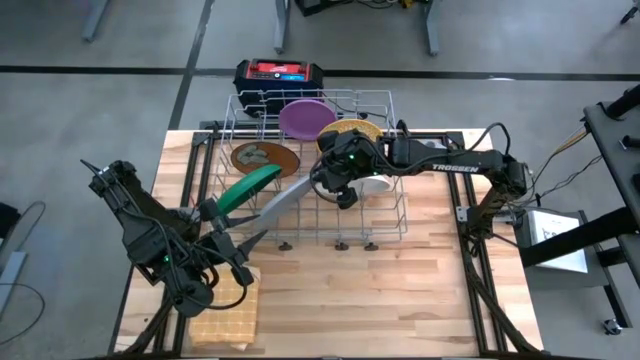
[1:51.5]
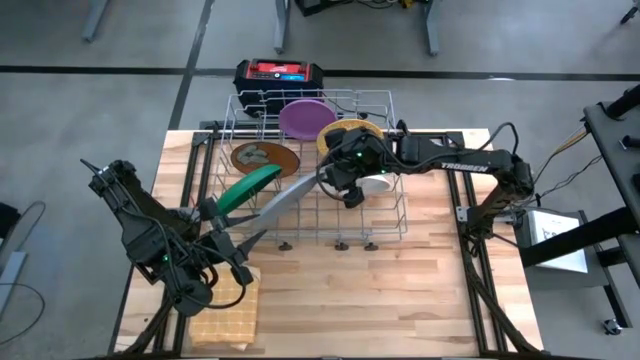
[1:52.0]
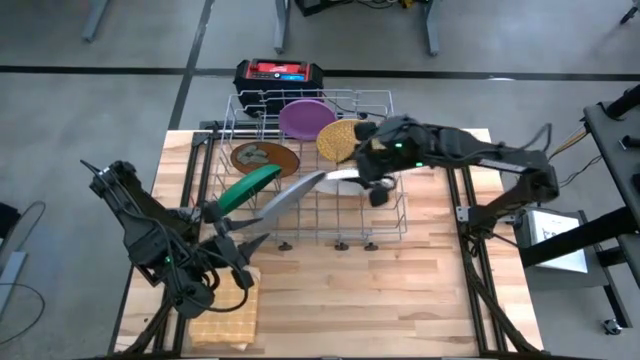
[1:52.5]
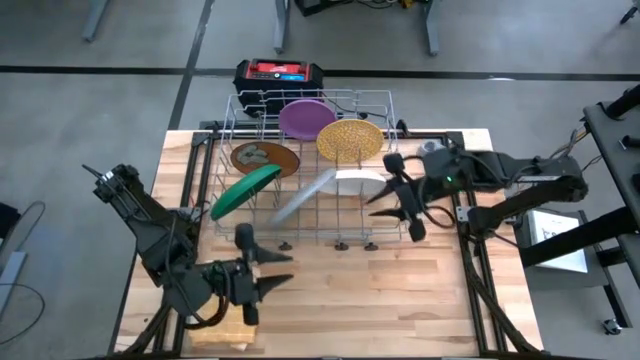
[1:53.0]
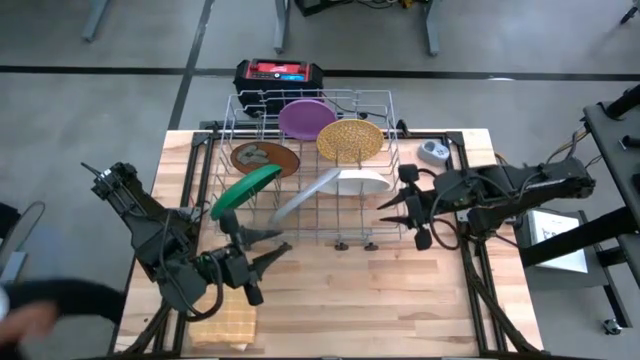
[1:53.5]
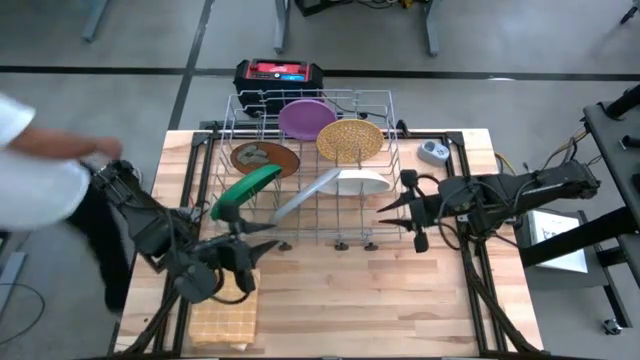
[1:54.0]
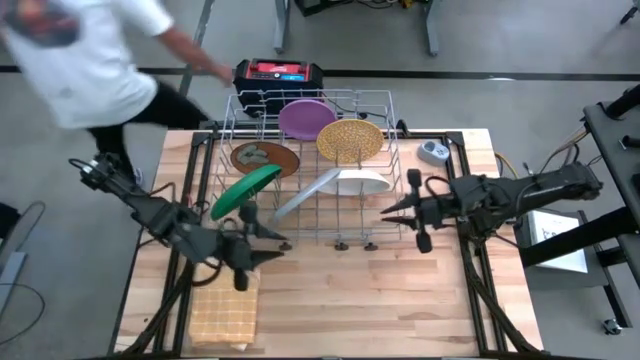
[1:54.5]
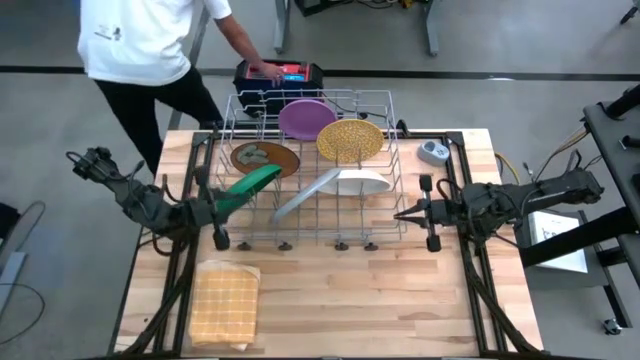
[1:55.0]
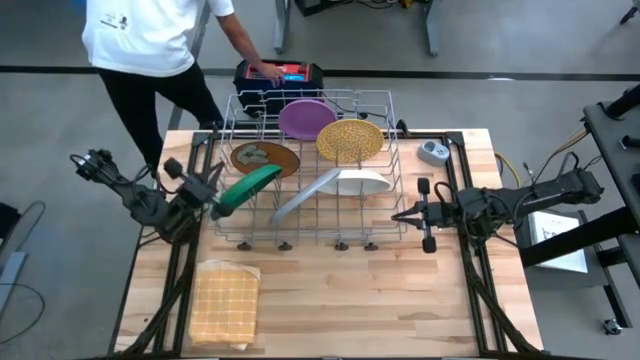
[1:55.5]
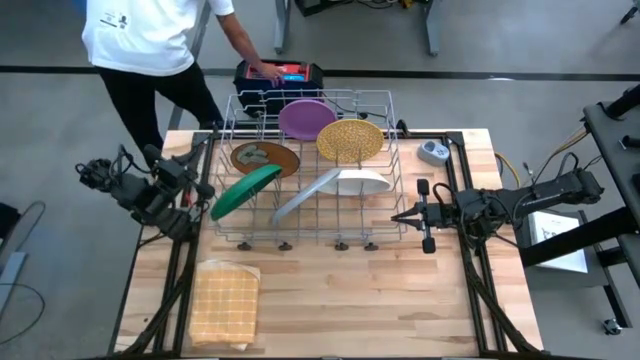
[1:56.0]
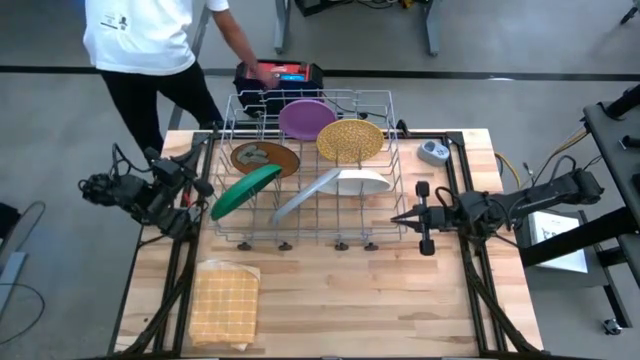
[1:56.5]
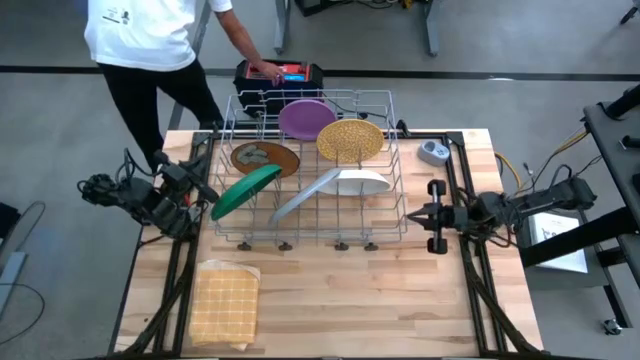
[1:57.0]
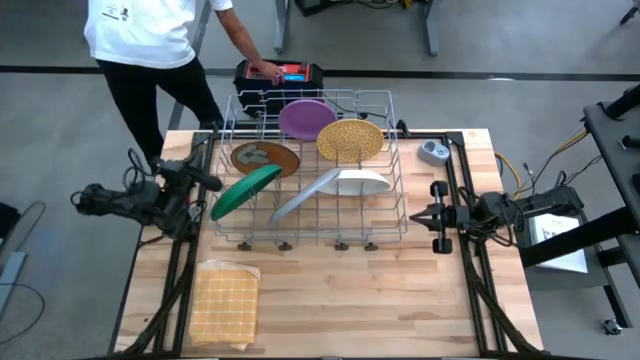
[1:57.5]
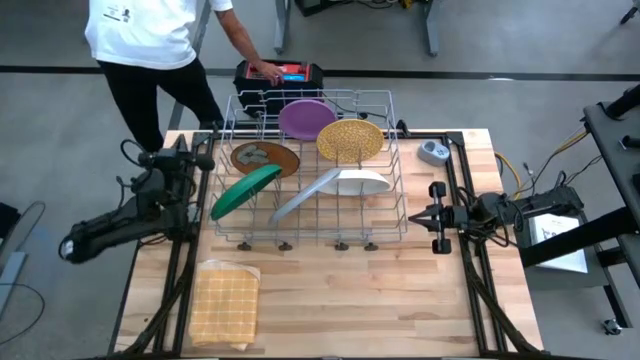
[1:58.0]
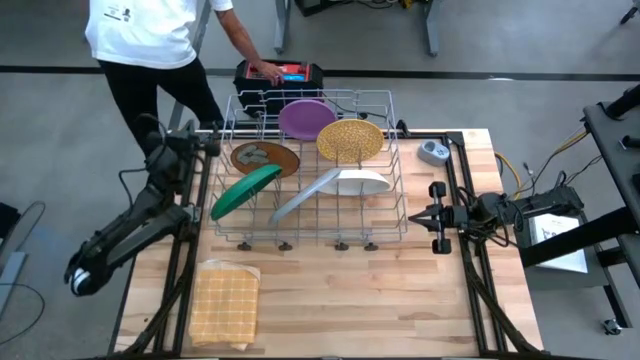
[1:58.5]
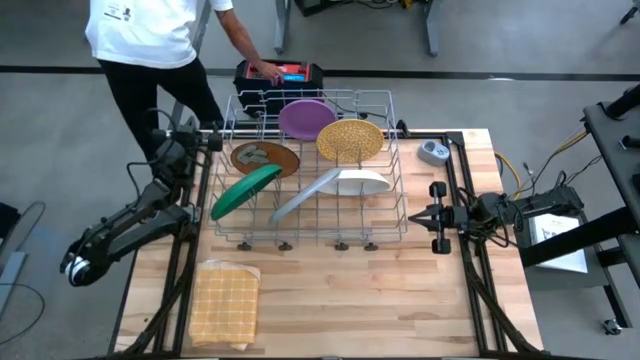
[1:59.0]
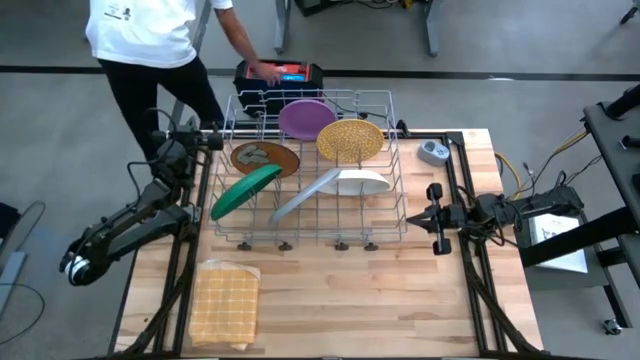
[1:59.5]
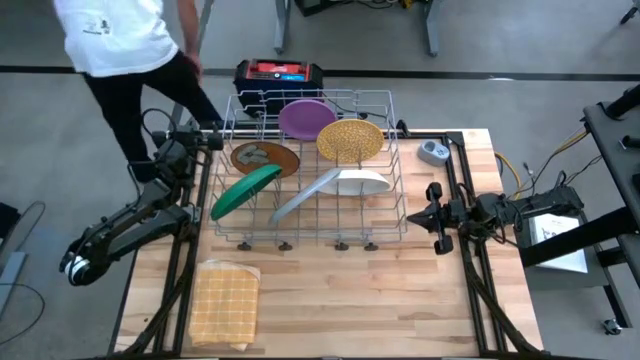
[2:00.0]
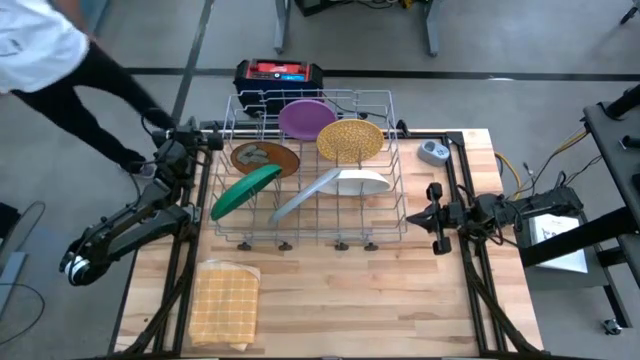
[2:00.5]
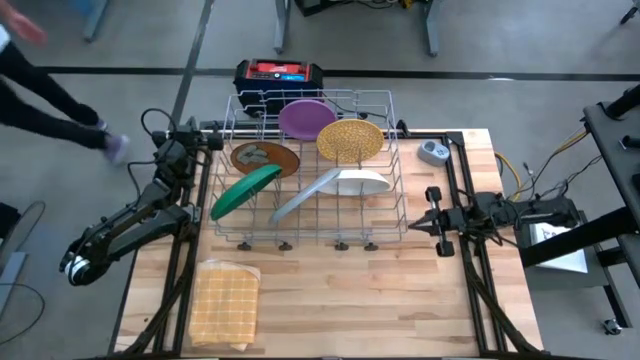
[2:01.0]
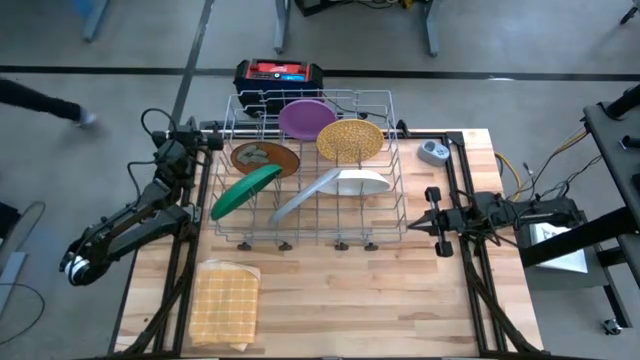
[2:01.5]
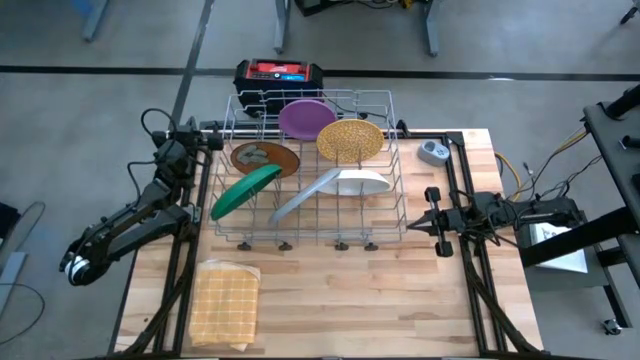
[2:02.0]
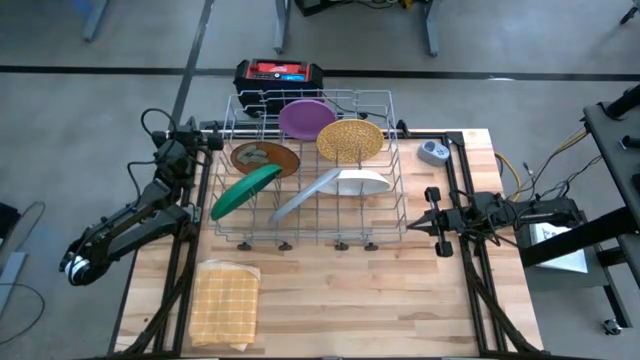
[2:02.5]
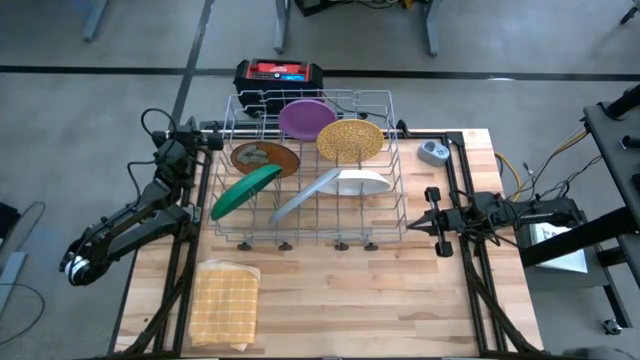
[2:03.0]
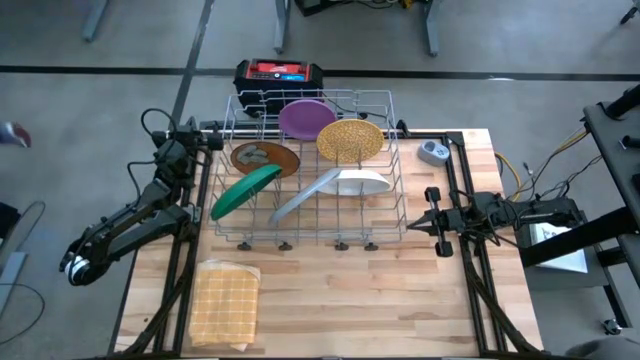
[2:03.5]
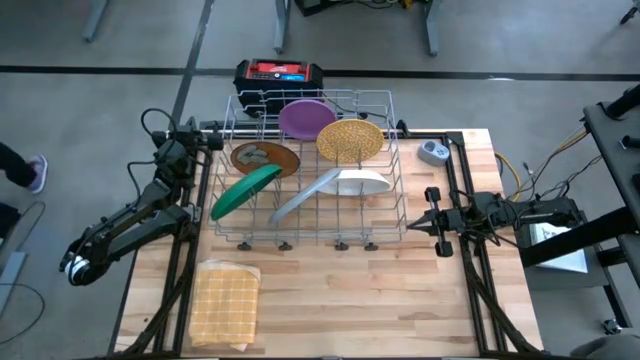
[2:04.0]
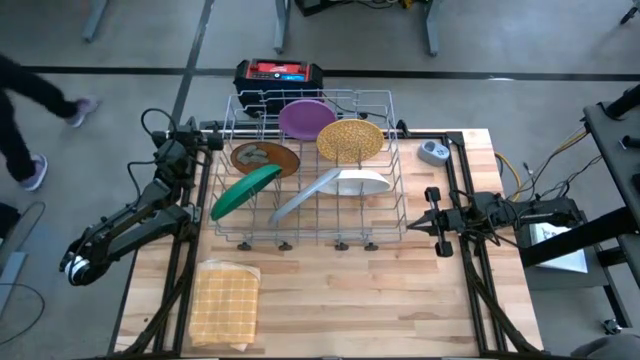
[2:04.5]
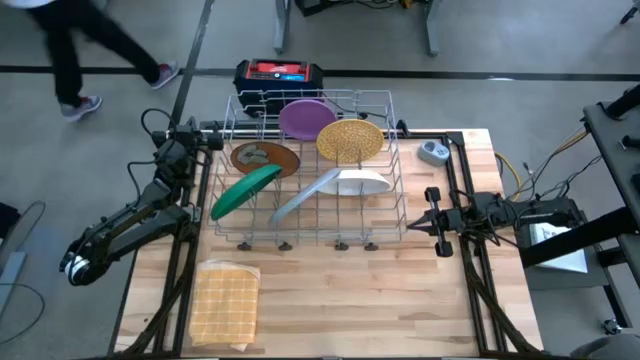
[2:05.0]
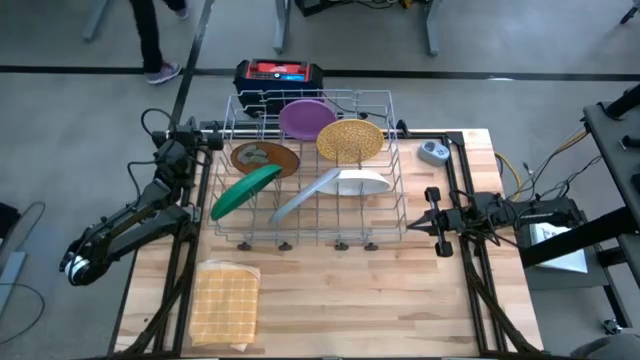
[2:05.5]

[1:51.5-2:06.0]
Task: Sort dishes
Return to Home Position
